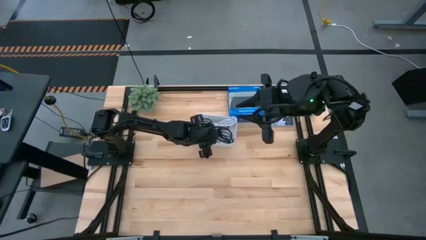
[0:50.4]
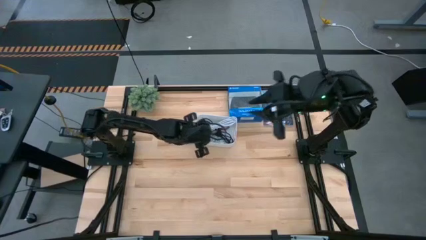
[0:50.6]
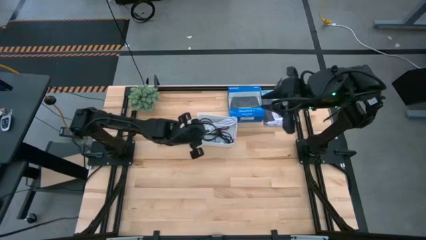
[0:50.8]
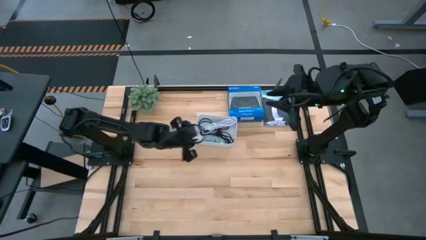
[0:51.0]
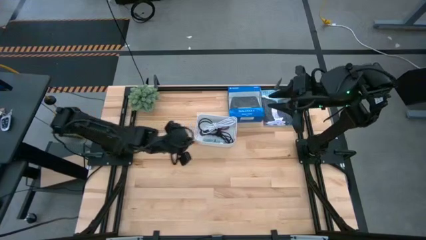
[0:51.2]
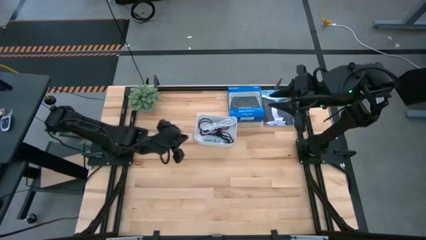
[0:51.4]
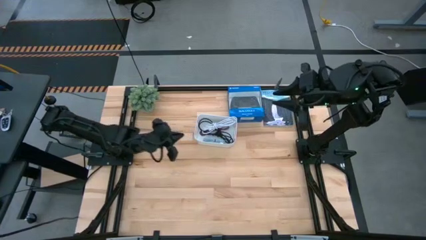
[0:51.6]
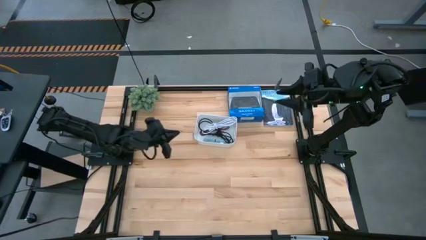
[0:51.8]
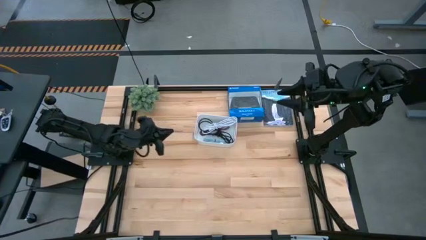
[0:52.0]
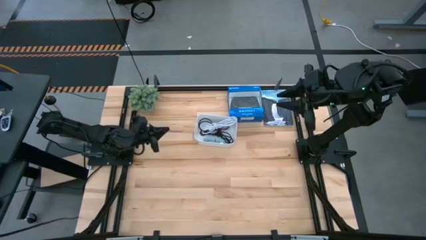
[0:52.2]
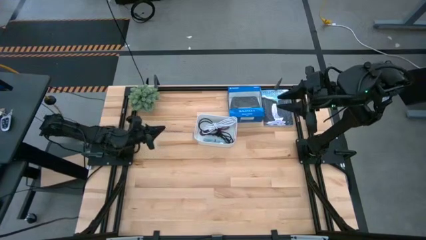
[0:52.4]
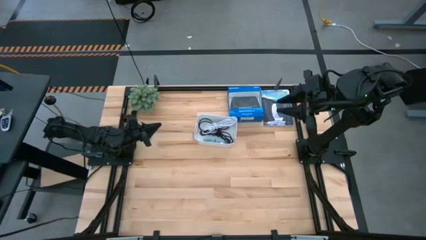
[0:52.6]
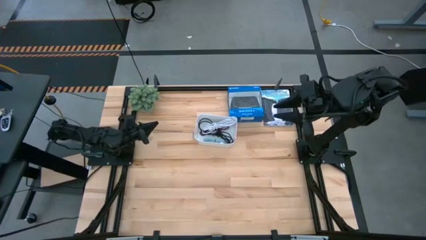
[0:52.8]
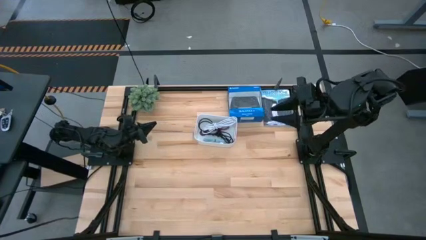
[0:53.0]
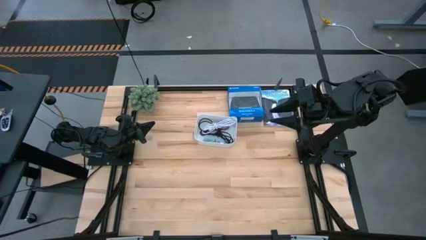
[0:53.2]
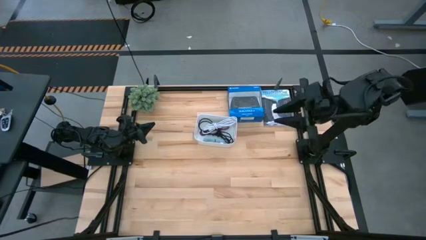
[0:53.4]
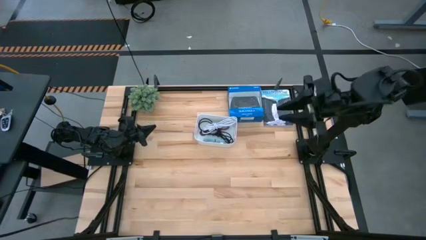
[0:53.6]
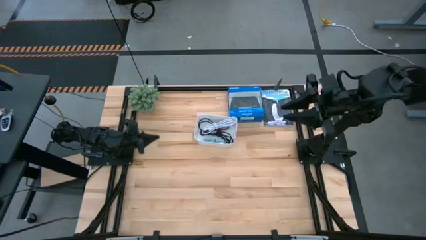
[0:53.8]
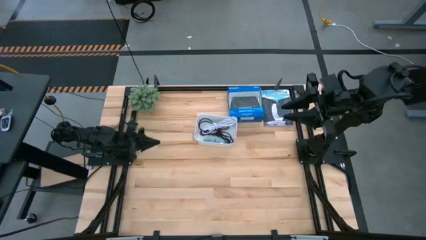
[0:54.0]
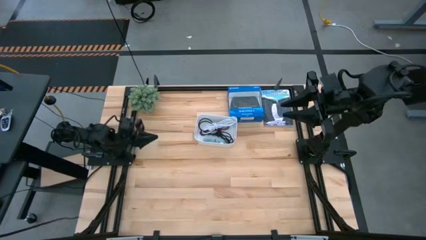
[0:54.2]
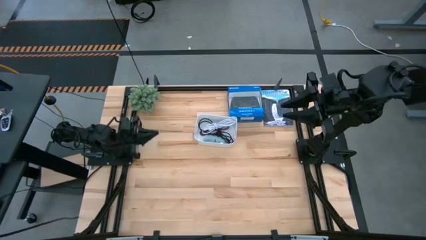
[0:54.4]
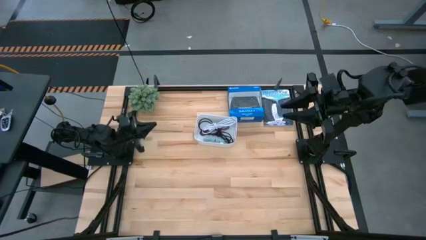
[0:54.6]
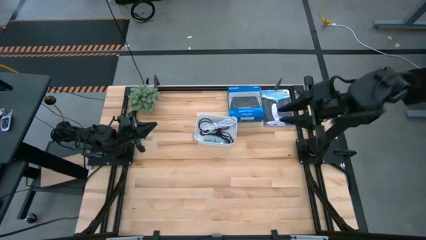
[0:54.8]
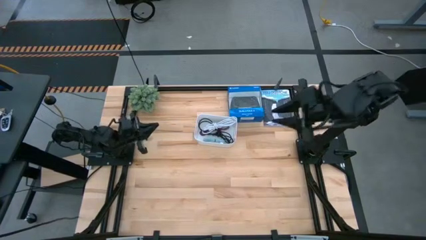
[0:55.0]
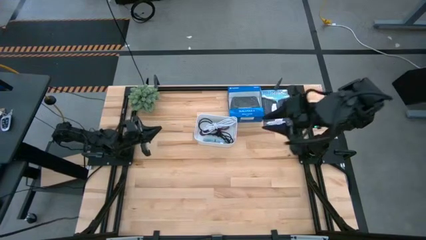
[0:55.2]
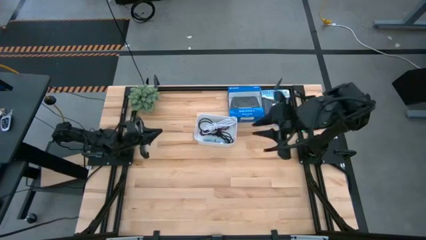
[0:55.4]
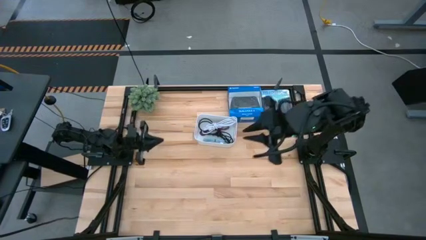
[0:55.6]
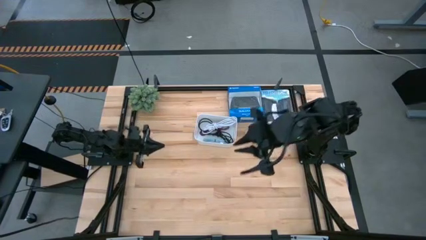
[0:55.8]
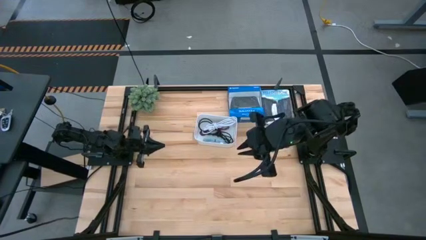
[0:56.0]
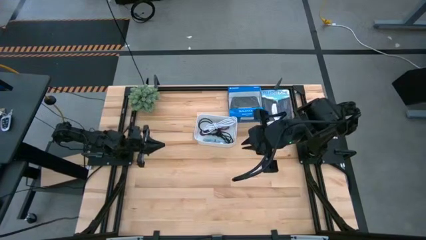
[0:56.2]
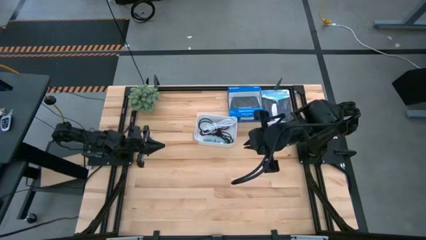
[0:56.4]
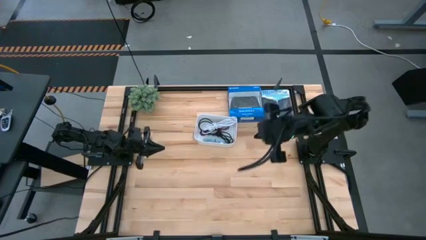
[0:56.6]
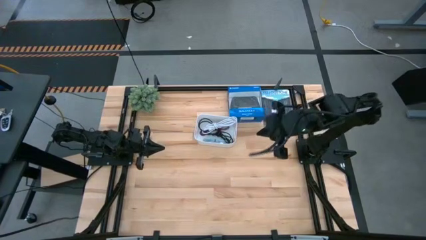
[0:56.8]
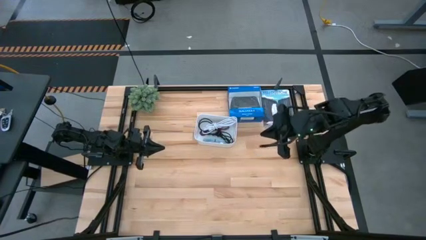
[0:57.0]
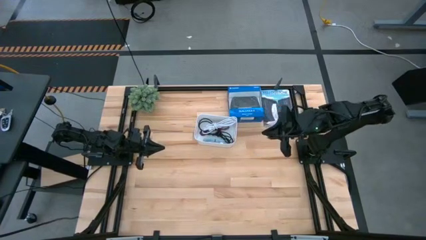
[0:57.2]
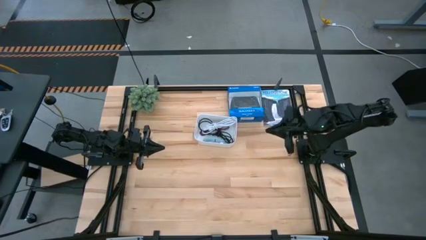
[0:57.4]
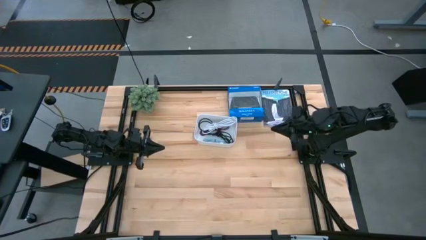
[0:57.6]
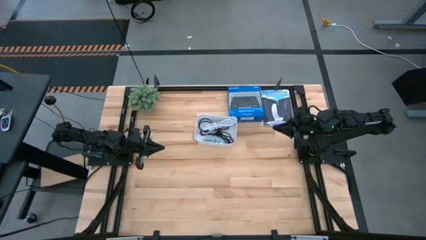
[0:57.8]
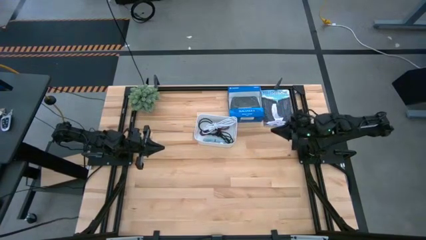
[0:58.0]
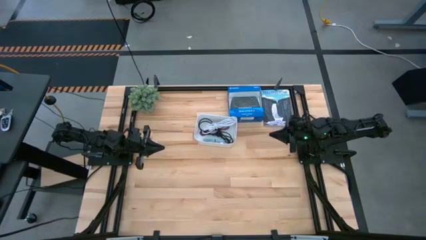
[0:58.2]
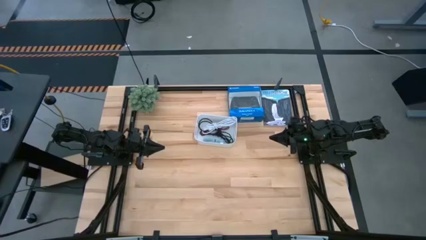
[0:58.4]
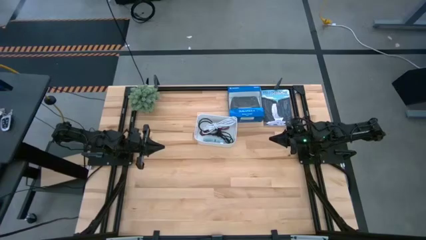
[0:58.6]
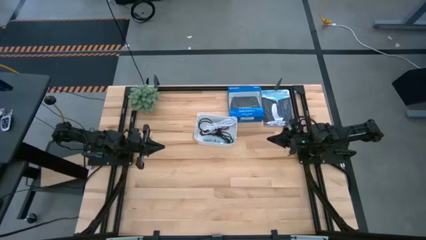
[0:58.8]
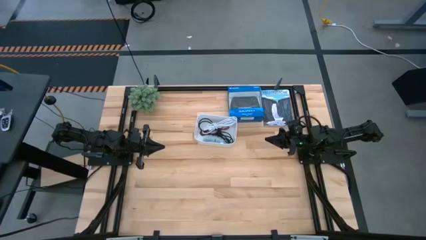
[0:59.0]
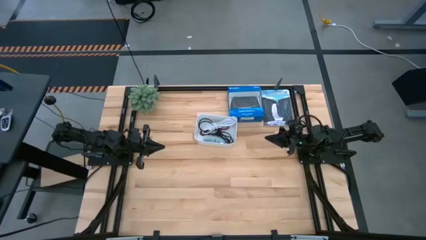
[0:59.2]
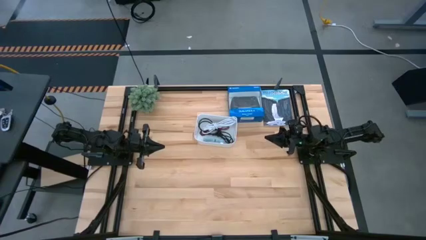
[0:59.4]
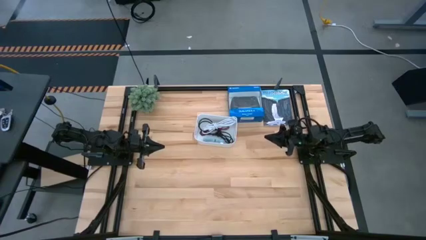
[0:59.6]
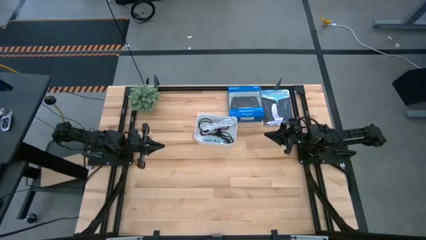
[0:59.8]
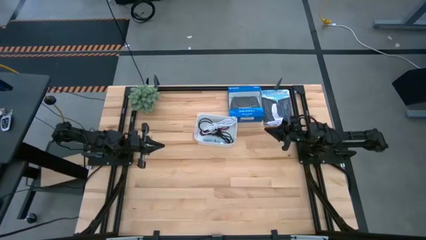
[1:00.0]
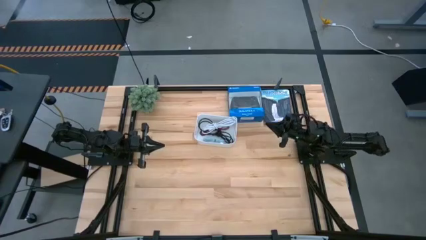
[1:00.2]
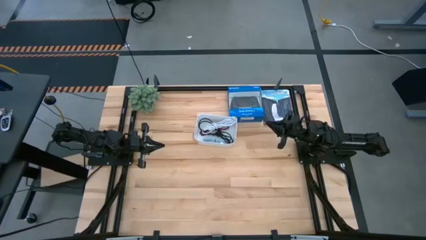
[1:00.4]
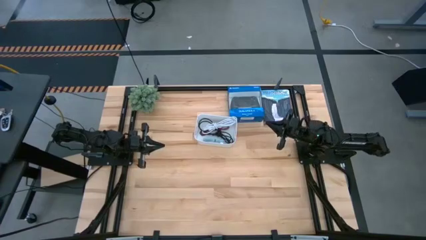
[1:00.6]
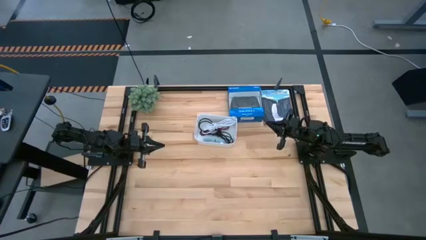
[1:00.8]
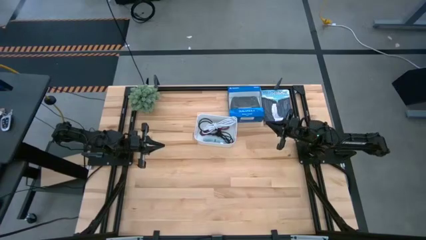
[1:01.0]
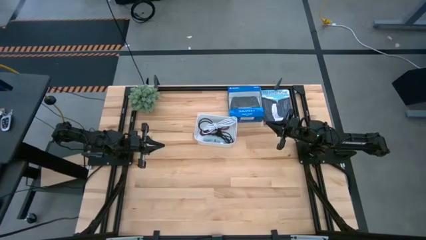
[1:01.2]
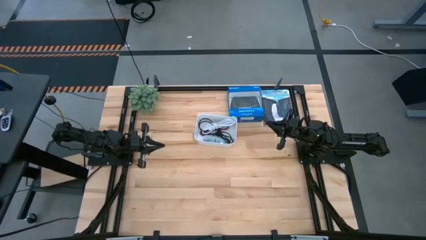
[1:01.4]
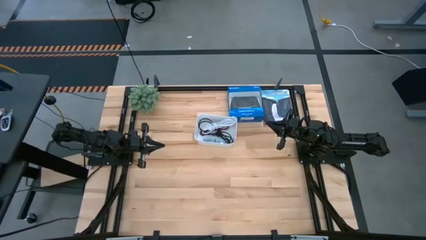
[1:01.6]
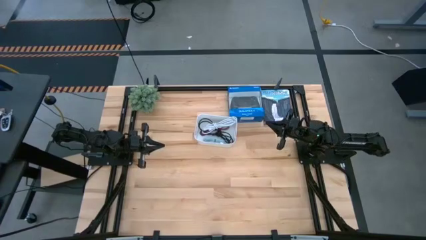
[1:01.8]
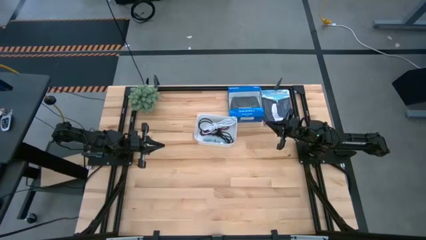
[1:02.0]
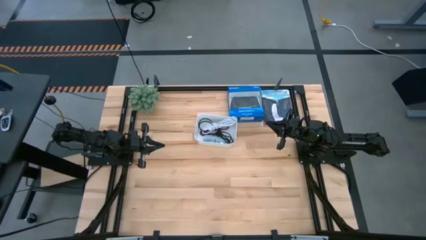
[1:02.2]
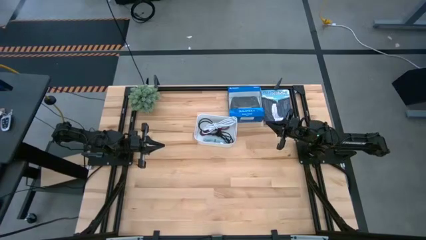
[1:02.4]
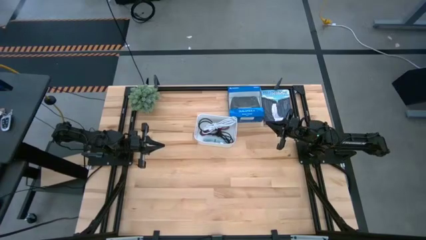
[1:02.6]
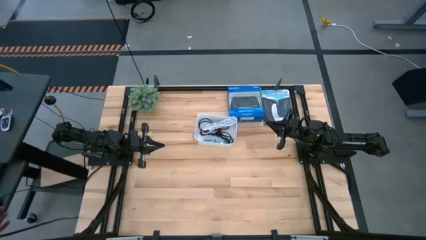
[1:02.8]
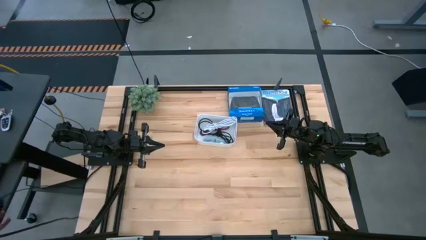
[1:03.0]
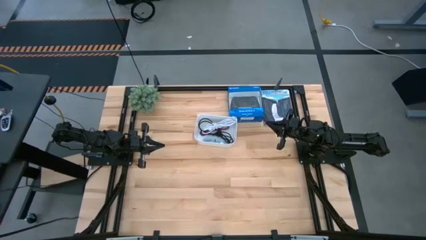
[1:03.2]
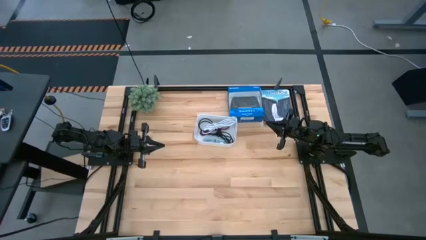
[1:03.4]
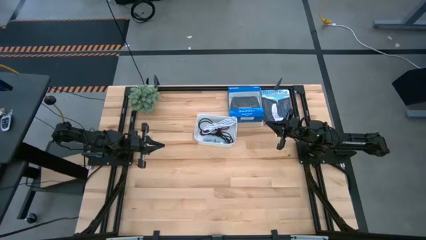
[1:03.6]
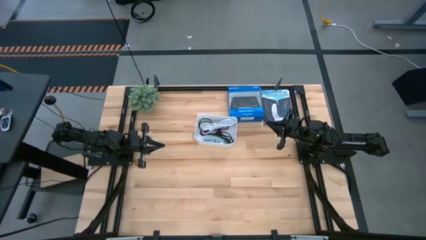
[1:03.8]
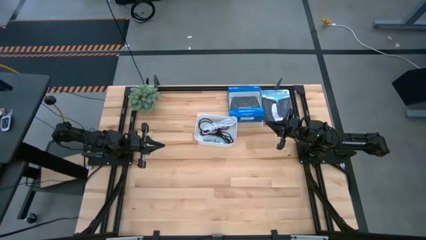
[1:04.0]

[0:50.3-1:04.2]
Task: Pick and place USB-C Cables
Return to Home Position

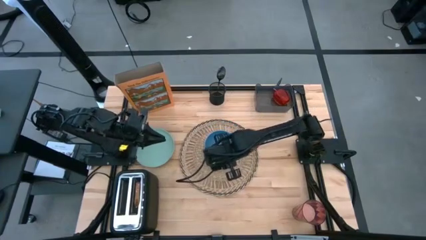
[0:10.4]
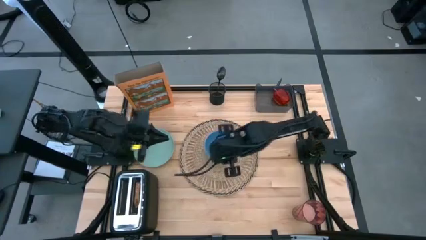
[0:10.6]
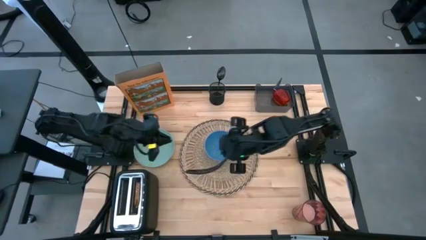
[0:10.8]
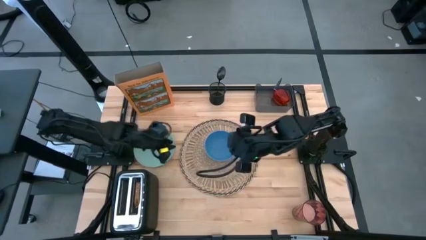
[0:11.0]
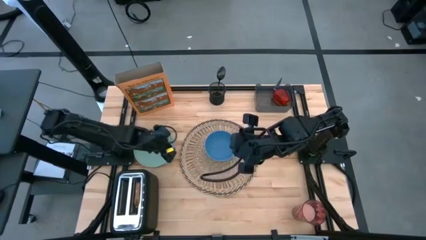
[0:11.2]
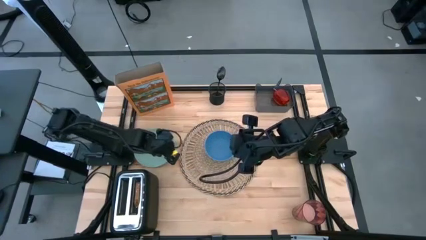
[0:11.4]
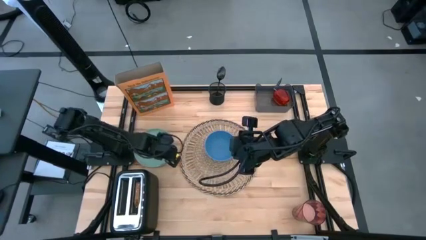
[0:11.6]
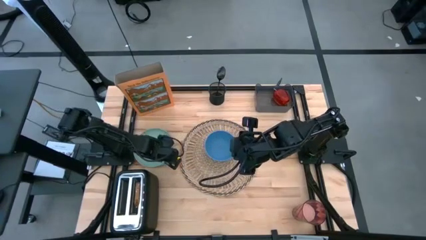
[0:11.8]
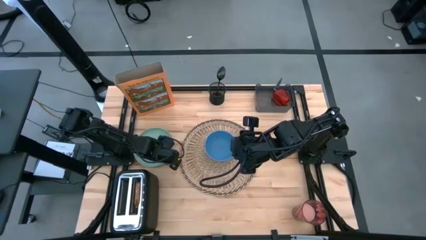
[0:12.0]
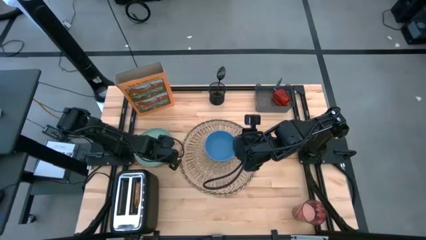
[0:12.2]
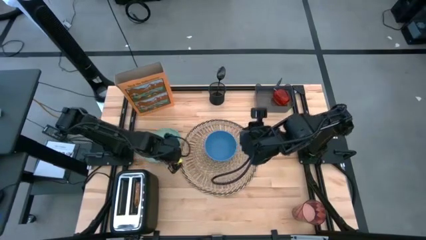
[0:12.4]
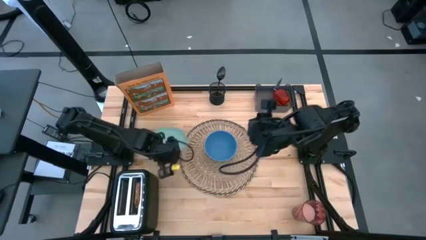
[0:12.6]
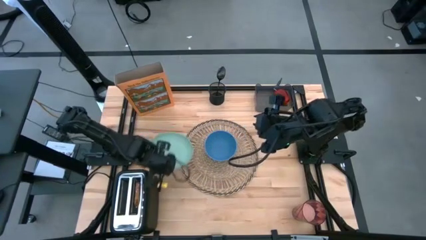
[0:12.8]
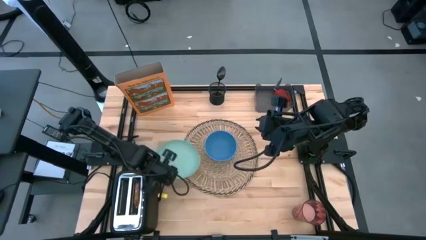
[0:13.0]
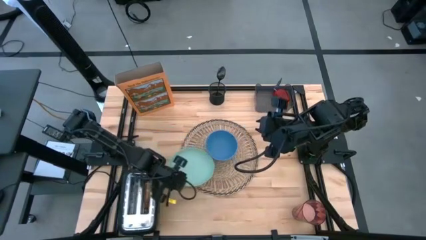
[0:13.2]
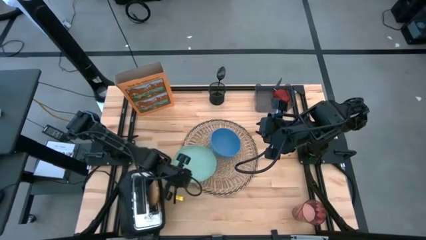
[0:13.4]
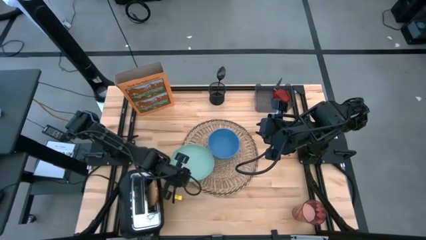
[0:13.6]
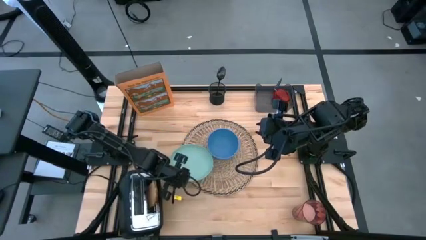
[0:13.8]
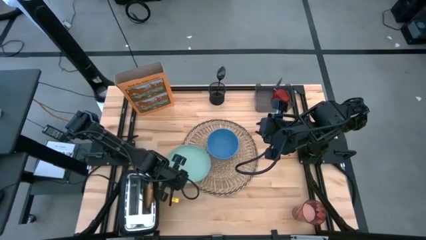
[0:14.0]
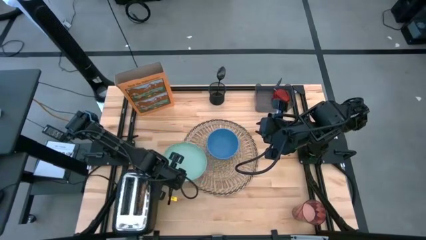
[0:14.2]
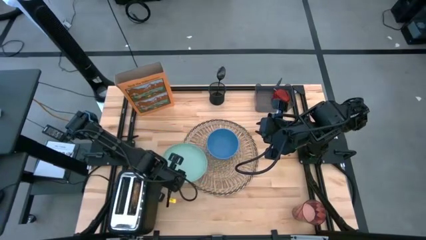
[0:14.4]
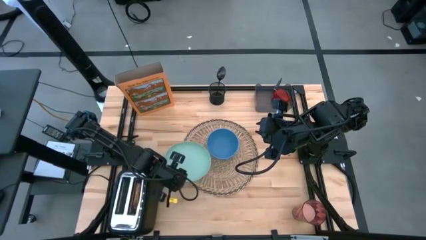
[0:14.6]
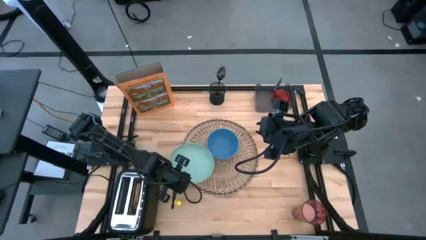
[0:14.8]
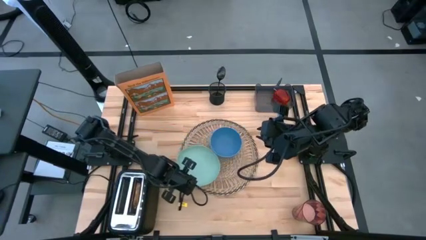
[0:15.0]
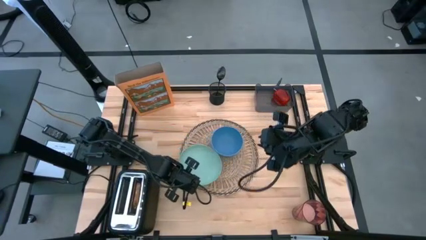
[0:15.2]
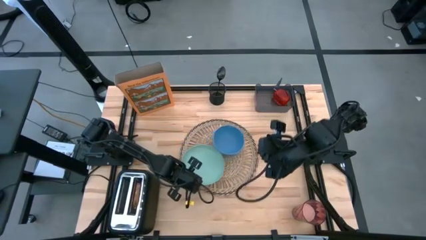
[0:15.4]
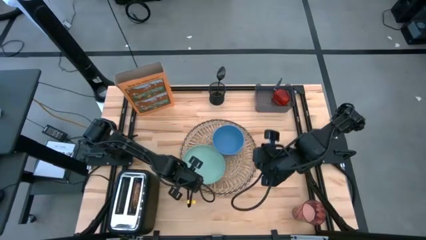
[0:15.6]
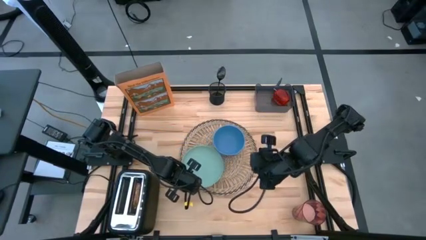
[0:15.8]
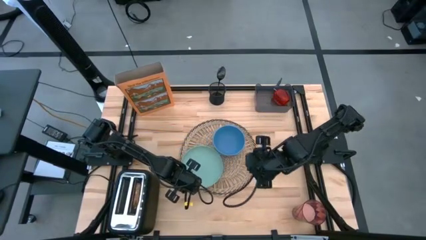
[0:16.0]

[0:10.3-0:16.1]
Task: Arrange a breakfast setting
Put the light green plate on the brown table mat
